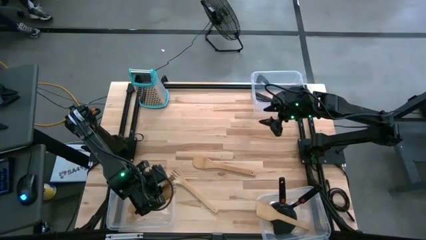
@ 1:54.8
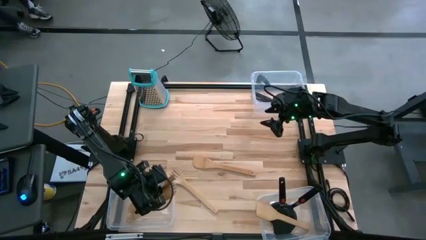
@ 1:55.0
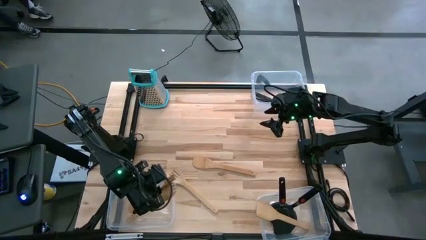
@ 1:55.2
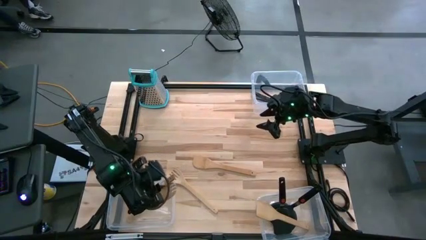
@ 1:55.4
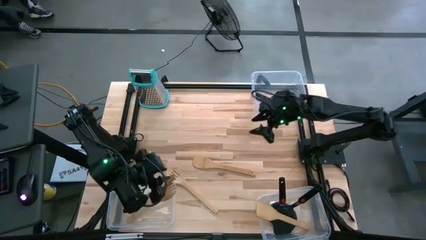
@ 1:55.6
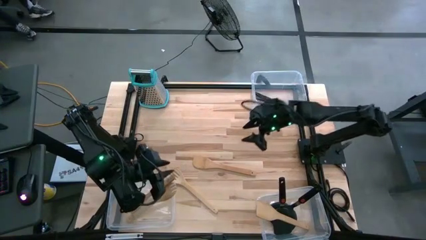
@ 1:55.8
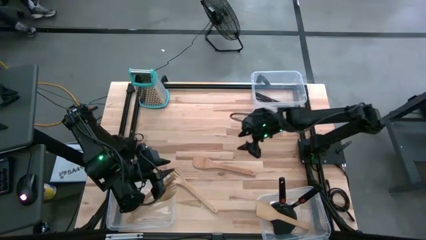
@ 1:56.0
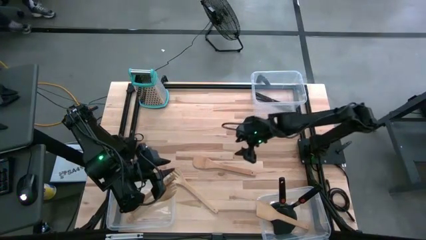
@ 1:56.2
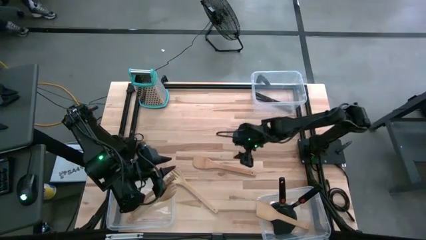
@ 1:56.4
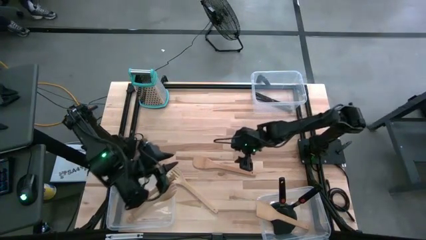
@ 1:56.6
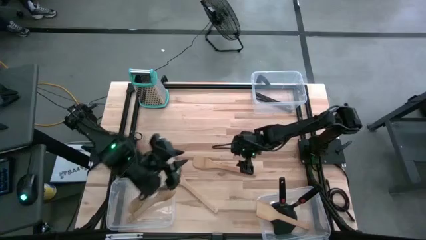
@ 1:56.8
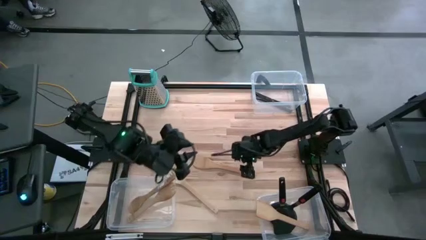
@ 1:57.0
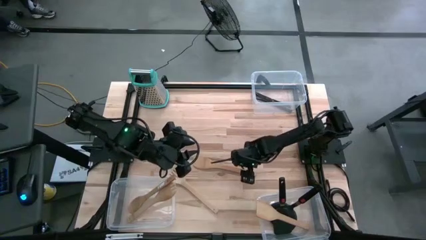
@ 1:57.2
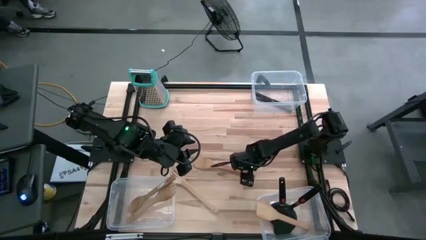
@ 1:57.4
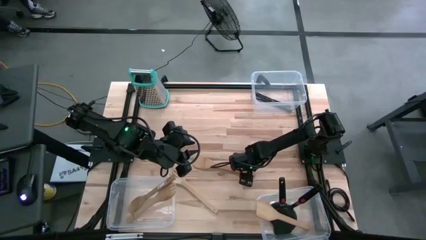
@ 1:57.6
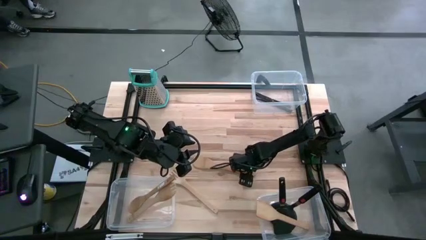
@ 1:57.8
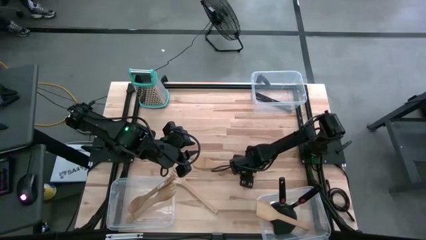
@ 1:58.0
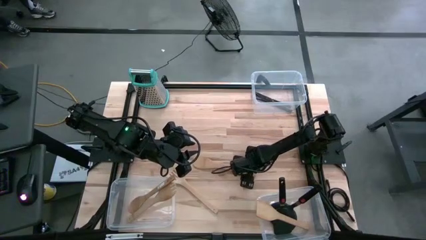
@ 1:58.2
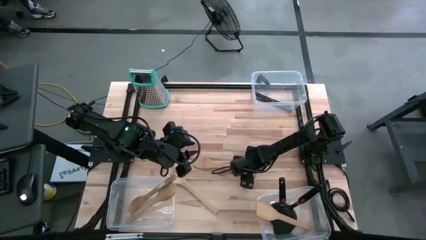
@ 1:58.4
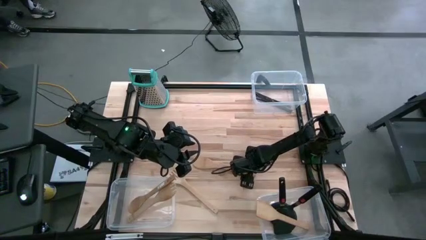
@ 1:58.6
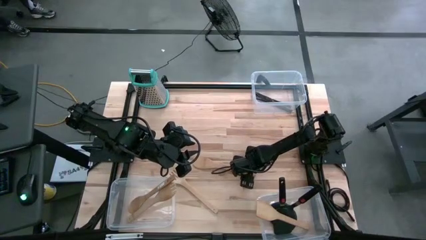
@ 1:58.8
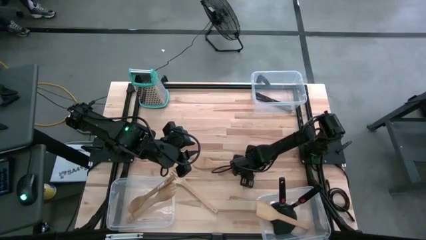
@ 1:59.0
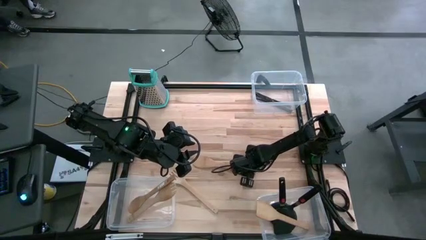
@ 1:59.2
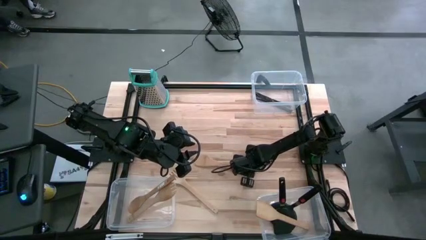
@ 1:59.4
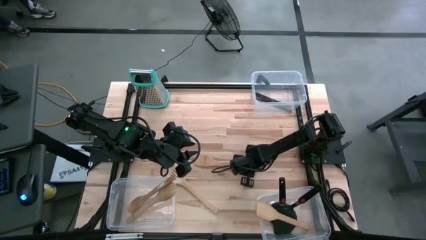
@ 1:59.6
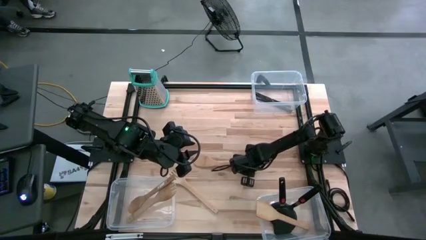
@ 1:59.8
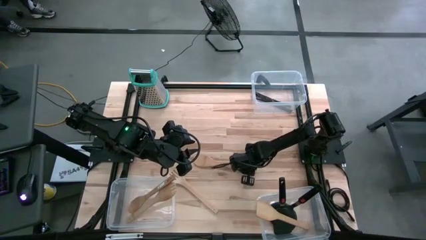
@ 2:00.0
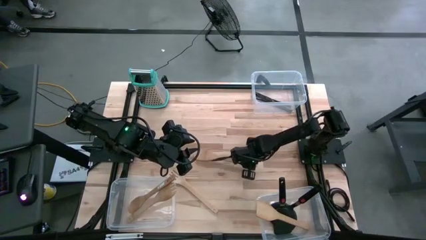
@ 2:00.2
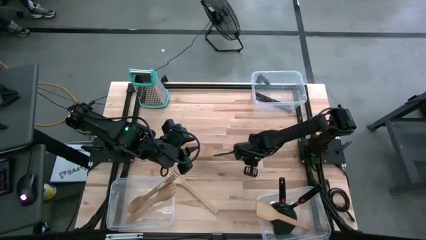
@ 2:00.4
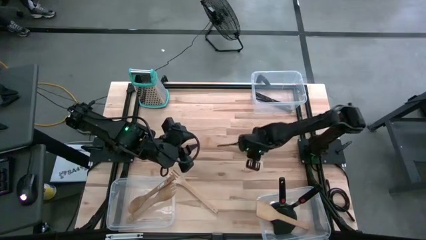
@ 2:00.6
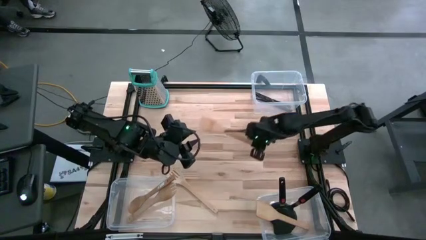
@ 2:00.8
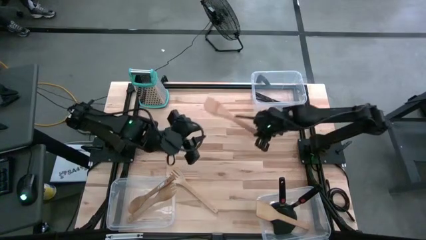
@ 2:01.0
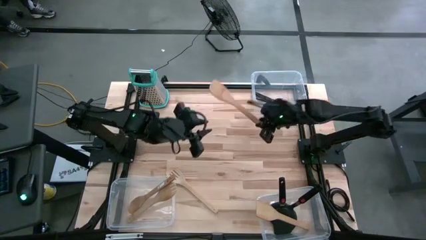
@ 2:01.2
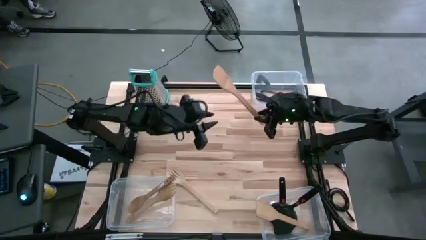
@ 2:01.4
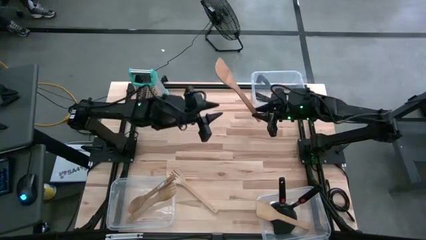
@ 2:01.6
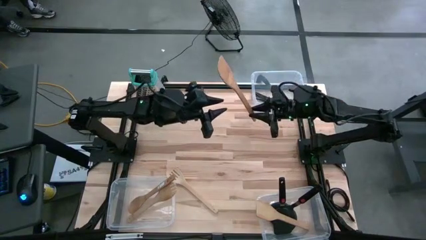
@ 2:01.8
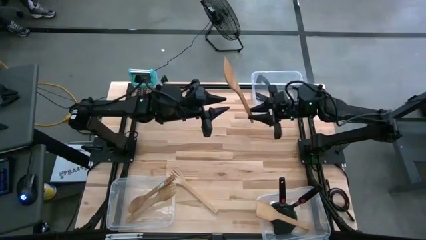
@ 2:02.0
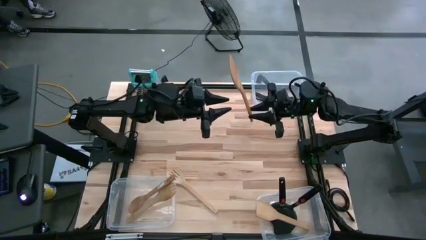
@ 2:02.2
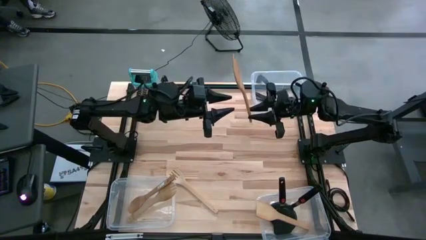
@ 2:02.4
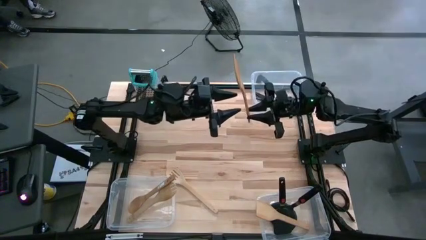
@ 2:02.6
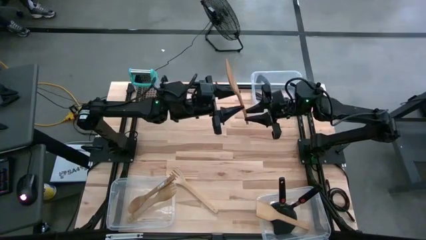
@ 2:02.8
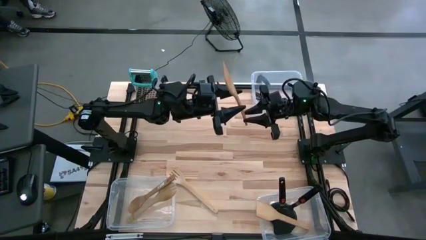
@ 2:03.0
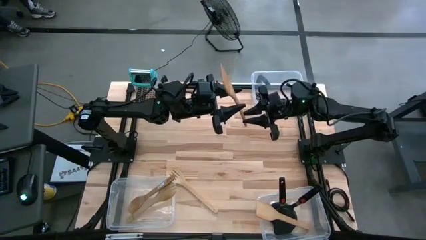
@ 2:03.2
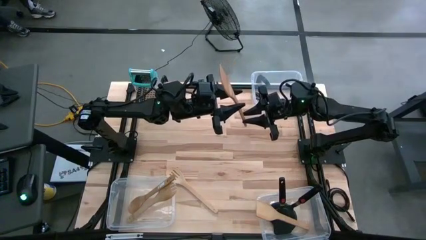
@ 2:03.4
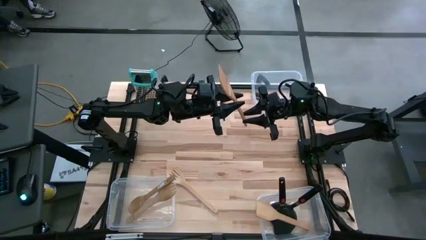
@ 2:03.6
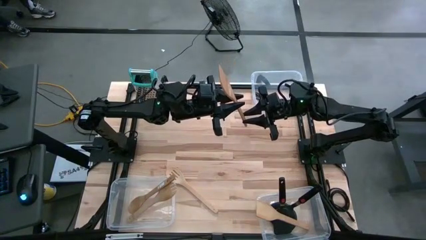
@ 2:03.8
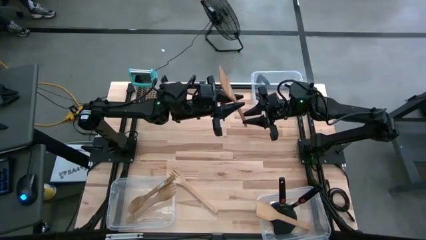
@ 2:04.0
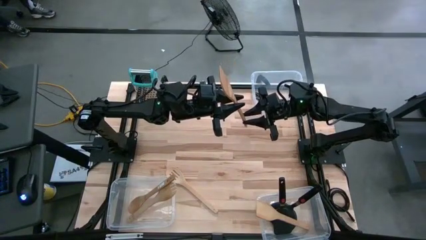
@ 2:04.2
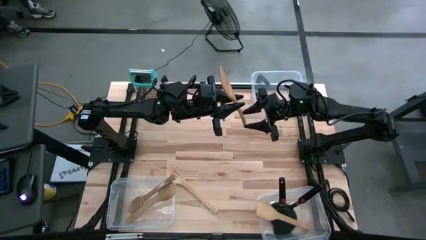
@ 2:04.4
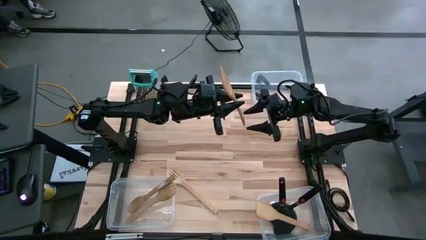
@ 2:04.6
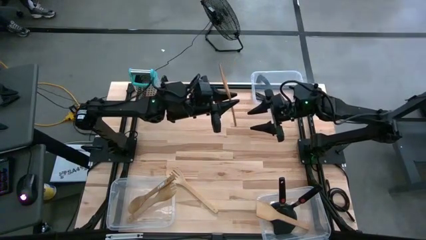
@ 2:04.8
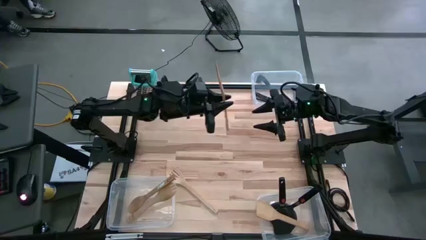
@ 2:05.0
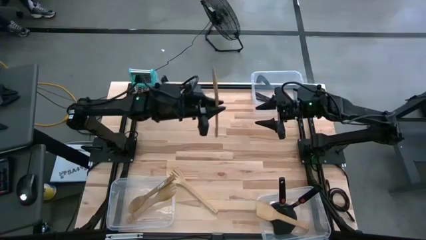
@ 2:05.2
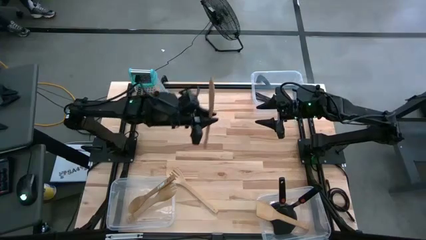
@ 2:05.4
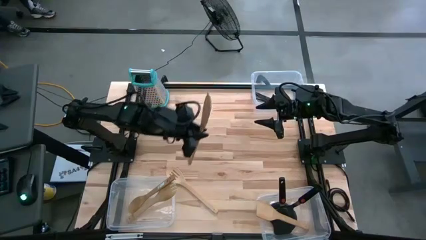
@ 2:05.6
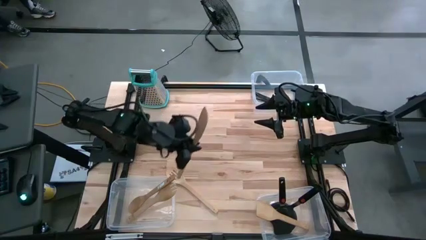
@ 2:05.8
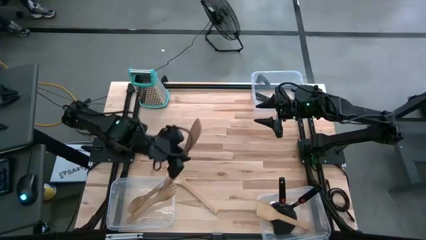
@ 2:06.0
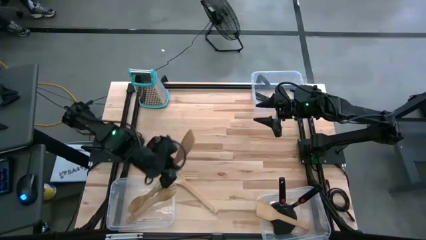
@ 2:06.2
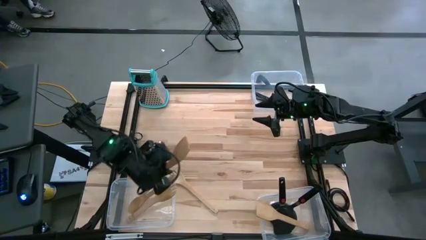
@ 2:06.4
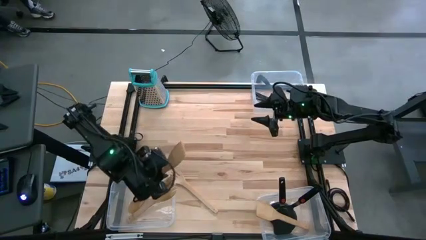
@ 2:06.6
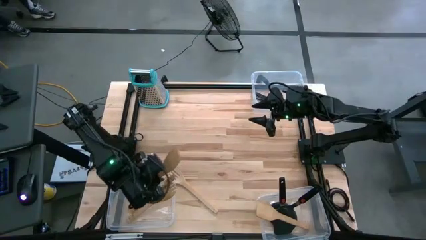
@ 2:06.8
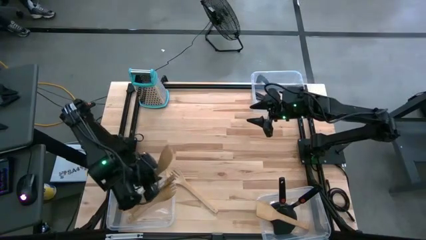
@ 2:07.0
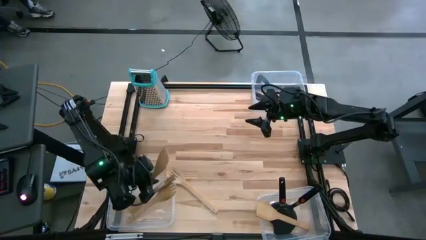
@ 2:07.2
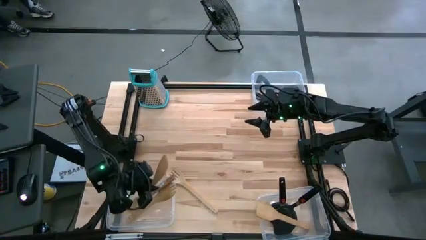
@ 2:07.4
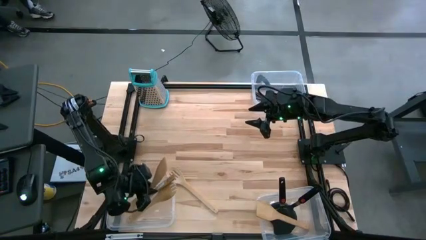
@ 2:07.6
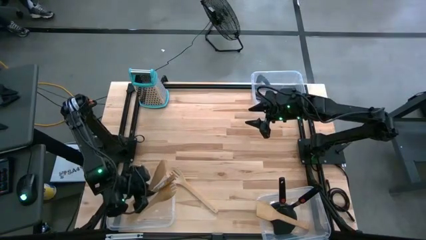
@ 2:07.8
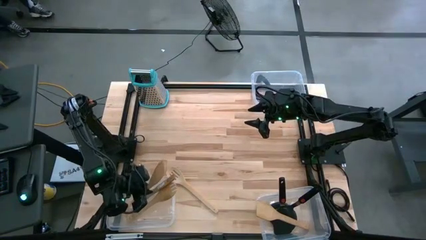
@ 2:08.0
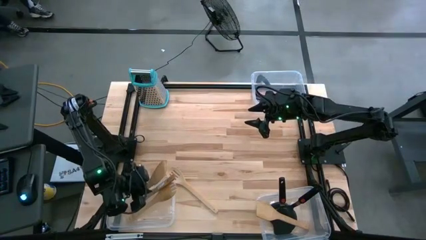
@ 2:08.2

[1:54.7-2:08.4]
Task: Pick & Place Kitchen Items
Put the light brown frying spatula into the bottom left transparent bin
